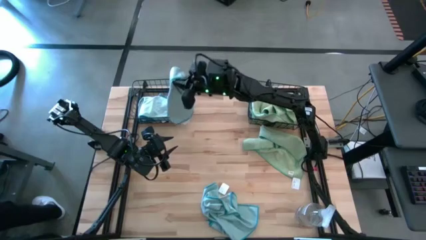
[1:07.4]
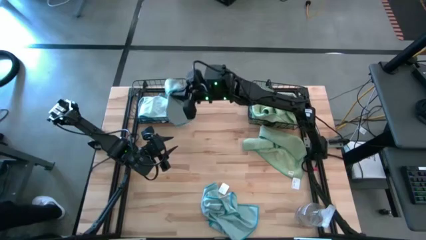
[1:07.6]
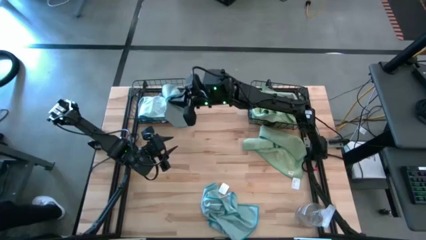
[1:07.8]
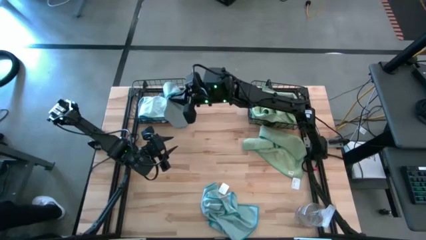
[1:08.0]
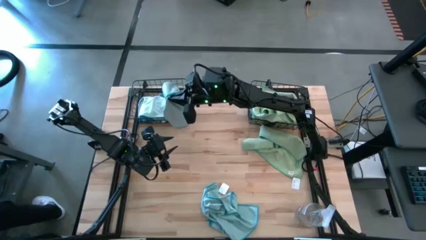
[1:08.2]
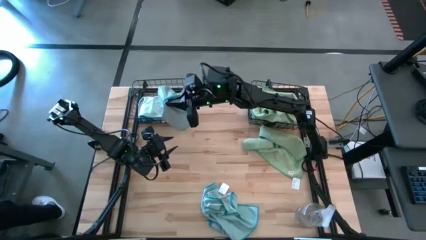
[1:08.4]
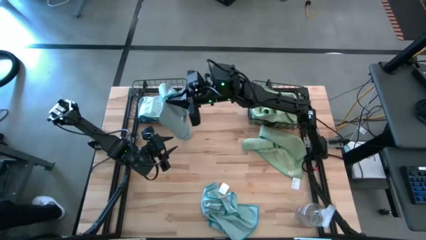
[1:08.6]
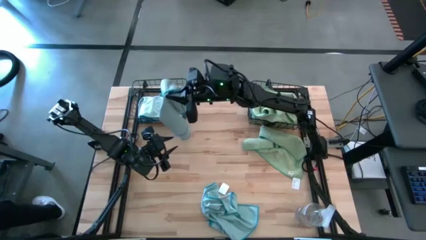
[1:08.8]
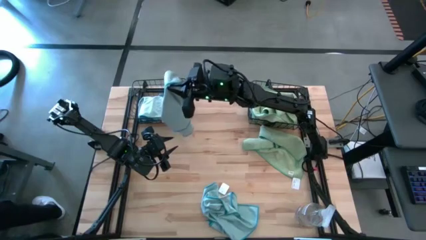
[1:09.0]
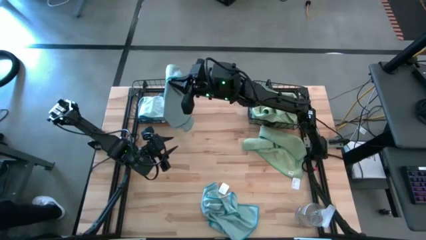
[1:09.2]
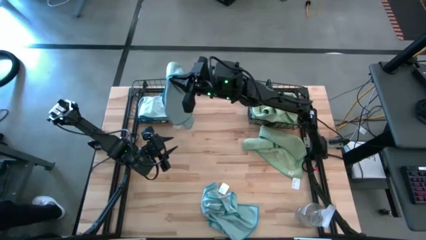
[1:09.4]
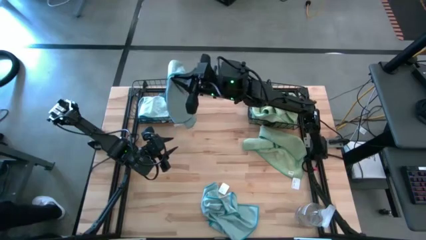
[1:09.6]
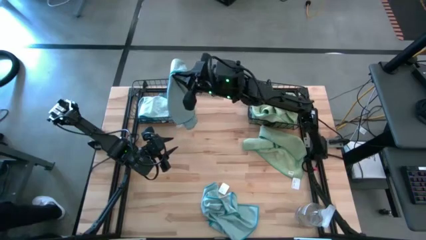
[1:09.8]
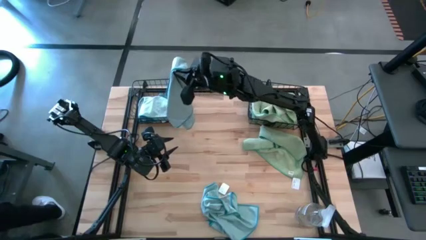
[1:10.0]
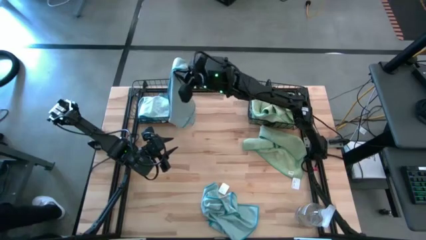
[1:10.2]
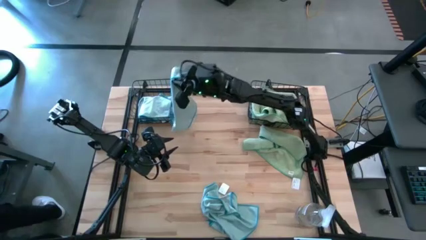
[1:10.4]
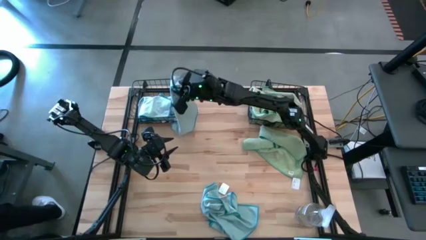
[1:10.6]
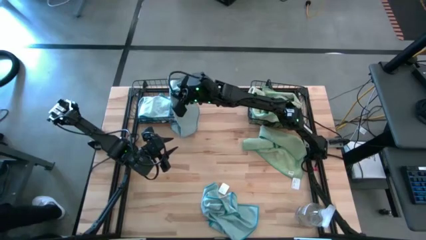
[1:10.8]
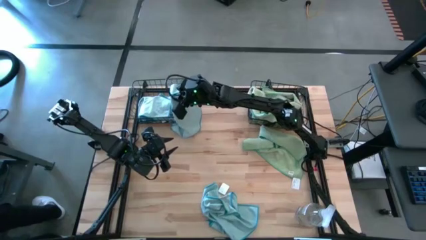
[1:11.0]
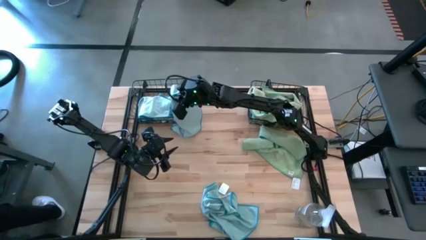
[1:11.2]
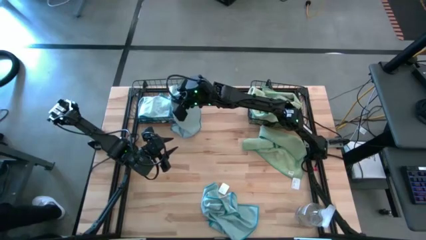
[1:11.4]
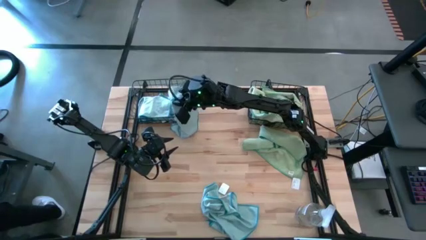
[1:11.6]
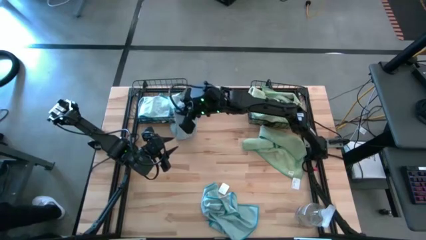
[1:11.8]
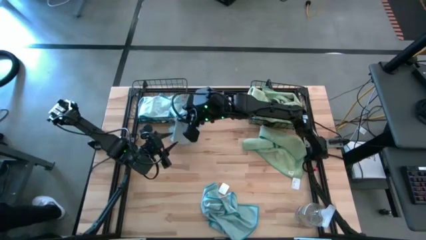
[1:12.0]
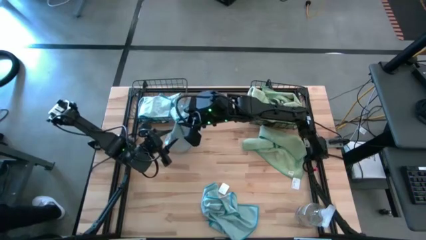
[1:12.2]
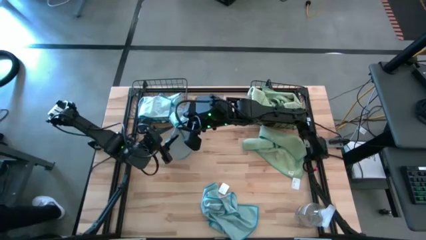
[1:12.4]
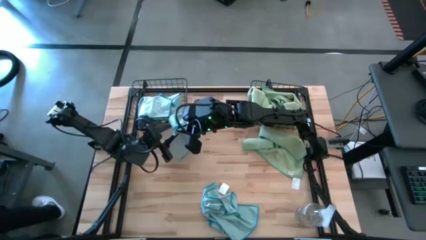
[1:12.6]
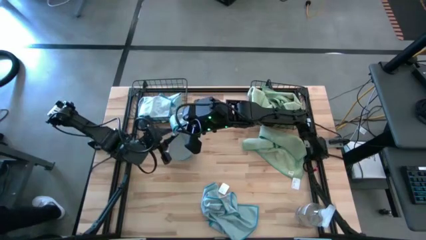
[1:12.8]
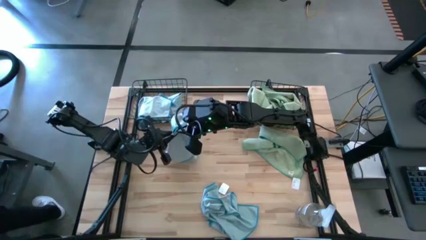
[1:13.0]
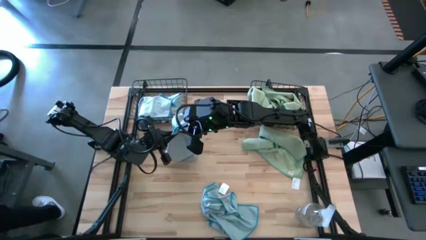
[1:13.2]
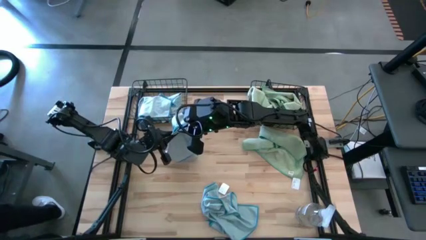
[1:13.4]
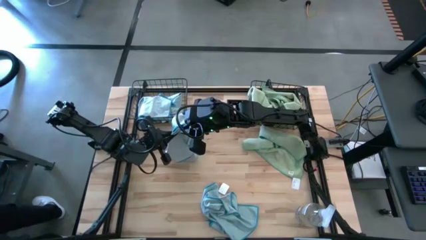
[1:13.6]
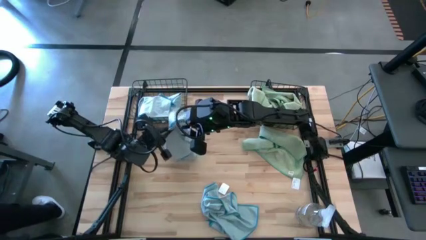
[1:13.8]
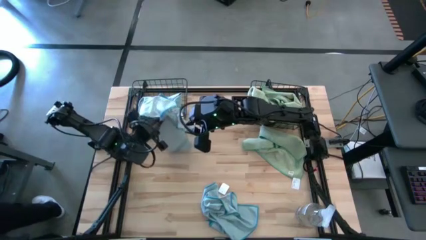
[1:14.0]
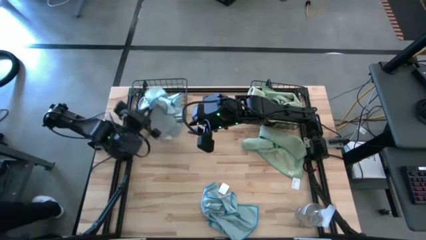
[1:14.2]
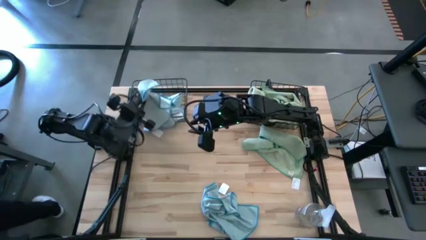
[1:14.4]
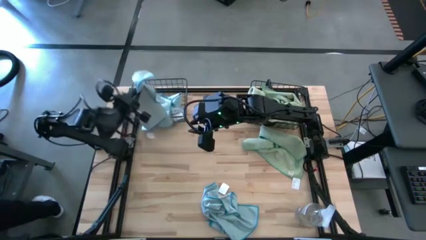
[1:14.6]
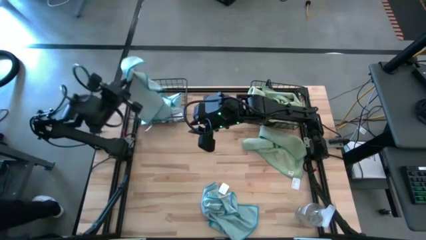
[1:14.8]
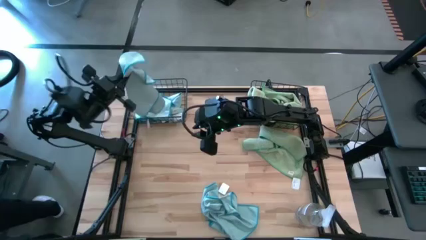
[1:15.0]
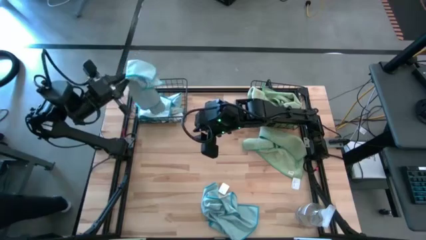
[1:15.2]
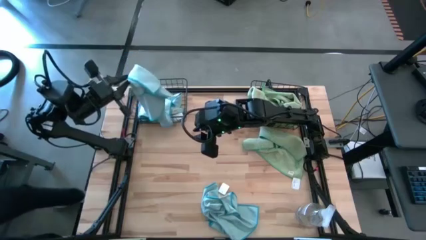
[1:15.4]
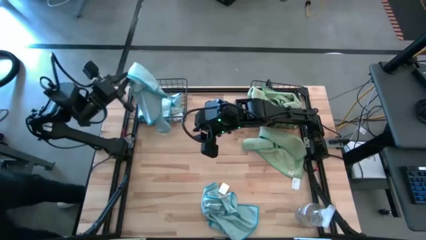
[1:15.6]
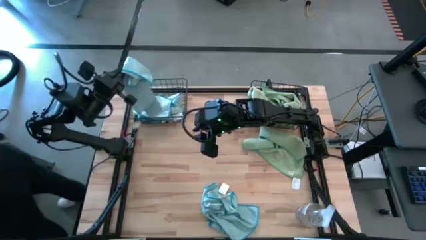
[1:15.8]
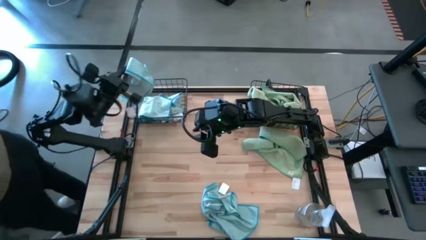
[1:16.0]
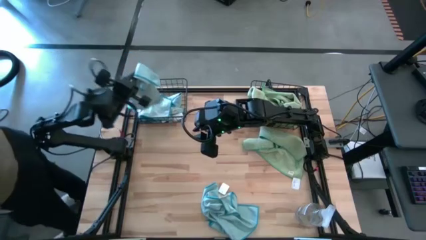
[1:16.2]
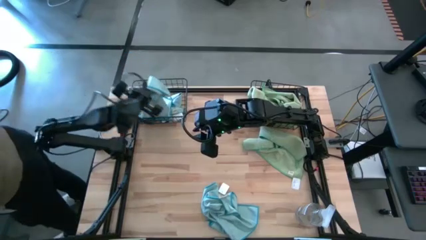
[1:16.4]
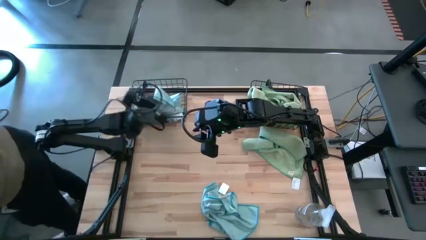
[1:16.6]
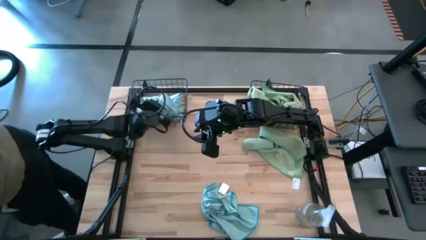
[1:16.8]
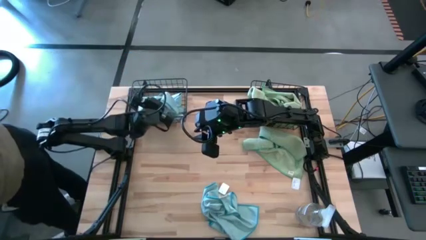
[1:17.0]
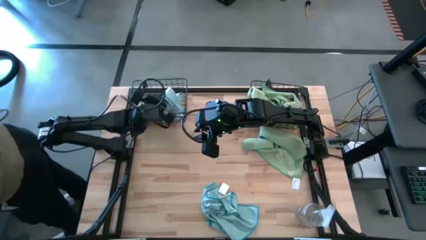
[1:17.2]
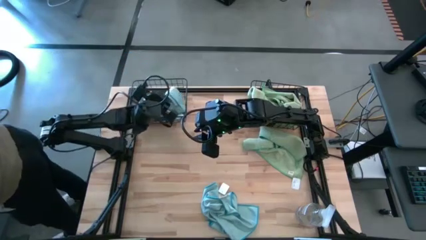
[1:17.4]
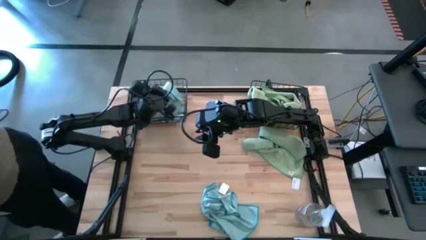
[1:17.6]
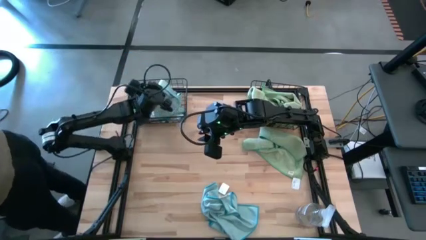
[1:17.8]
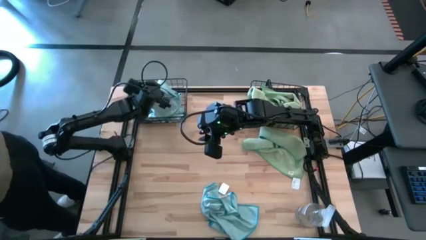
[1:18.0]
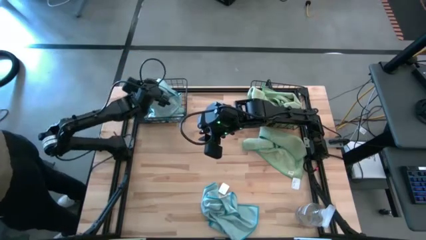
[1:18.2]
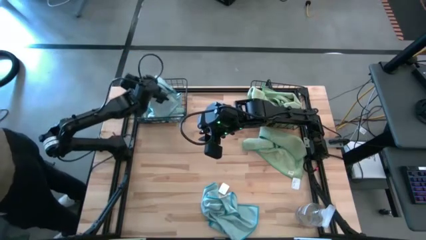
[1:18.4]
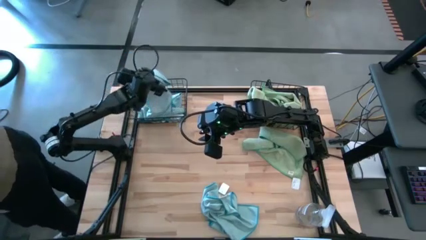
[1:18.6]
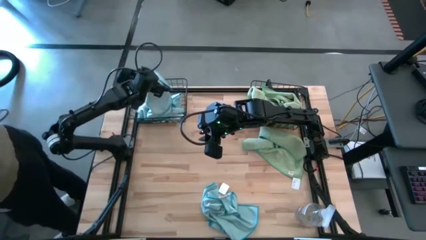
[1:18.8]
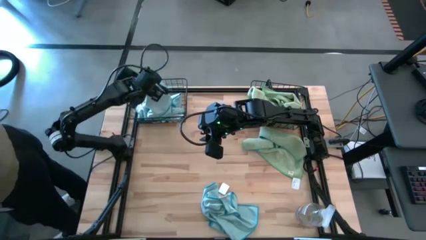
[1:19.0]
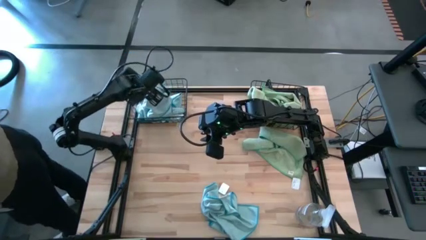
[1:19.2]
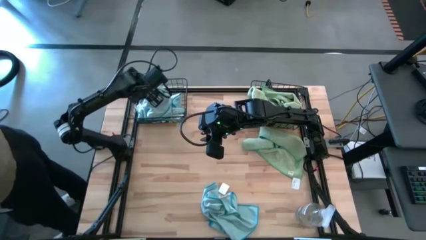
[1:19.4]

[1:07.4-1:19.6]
Task: Sort microfiber towel by color & place in baskets
Put the blue microfiber towel into the left wire basket
